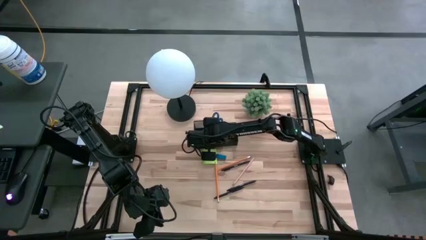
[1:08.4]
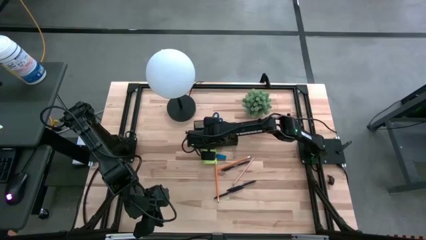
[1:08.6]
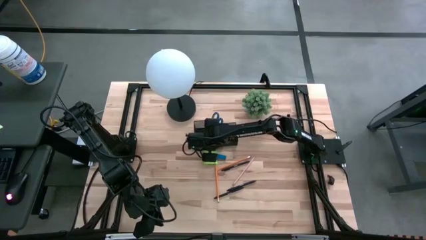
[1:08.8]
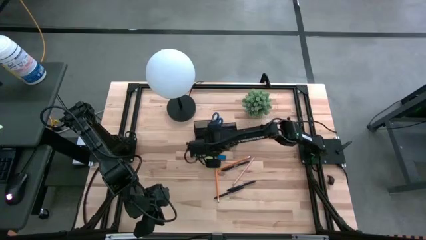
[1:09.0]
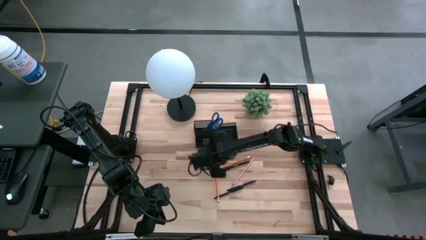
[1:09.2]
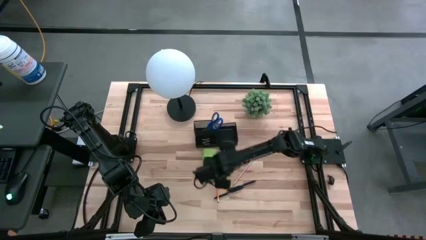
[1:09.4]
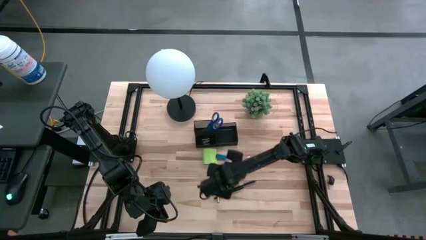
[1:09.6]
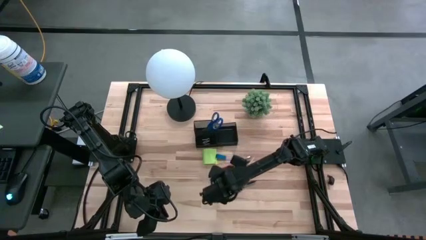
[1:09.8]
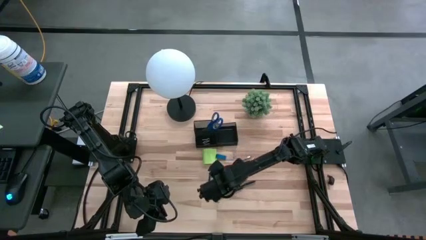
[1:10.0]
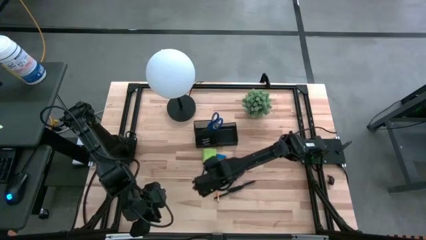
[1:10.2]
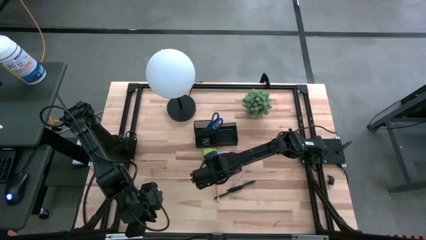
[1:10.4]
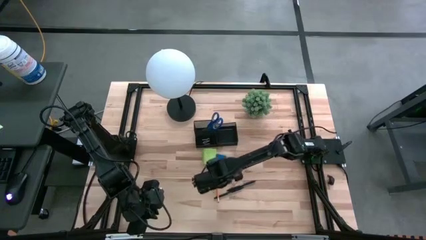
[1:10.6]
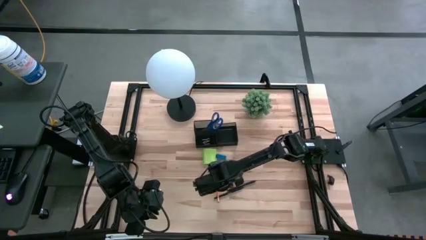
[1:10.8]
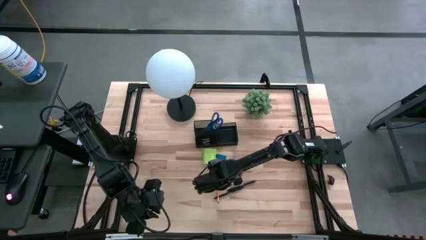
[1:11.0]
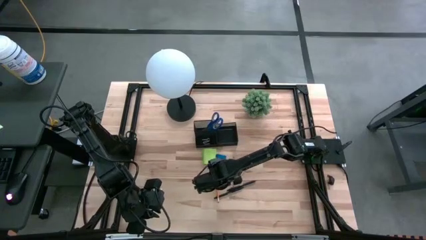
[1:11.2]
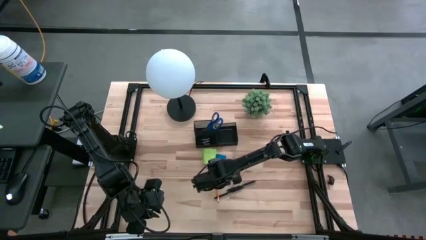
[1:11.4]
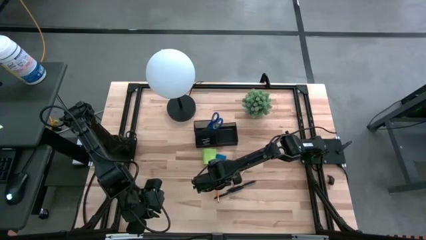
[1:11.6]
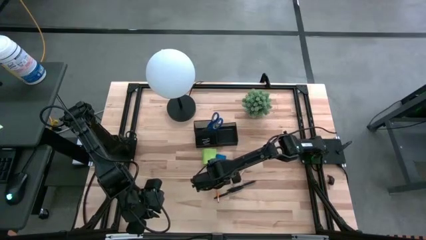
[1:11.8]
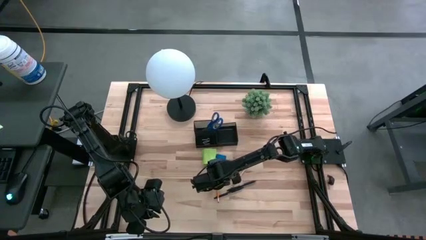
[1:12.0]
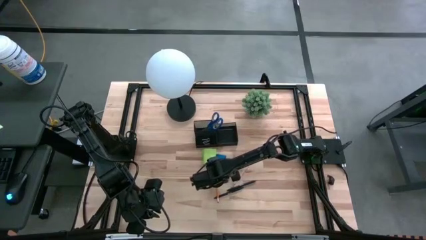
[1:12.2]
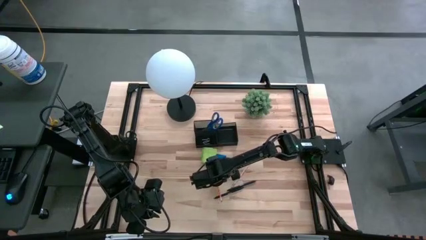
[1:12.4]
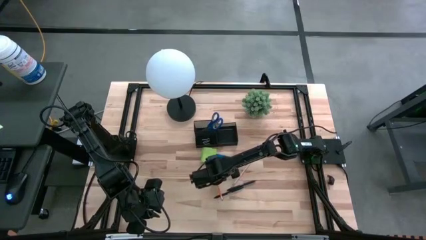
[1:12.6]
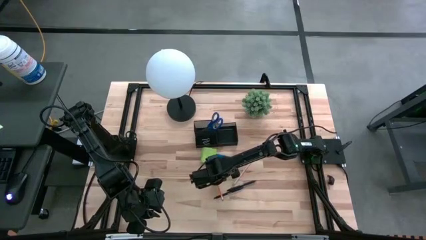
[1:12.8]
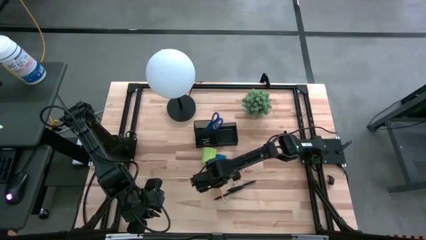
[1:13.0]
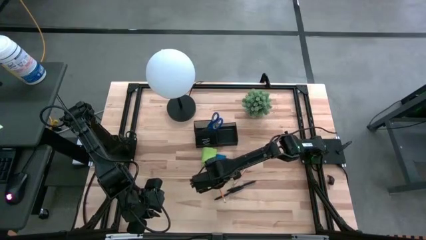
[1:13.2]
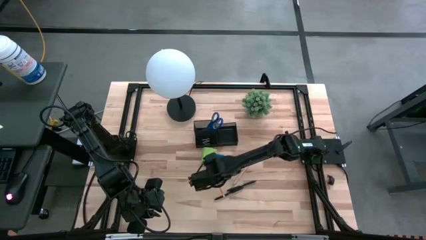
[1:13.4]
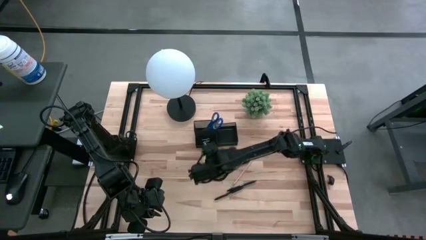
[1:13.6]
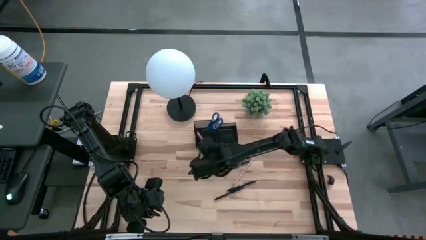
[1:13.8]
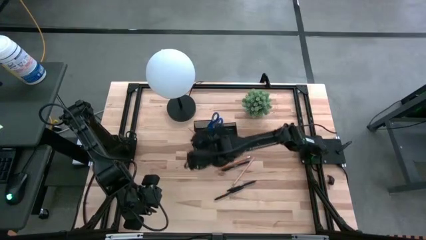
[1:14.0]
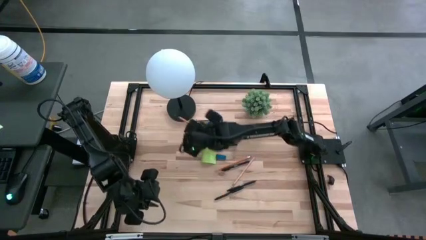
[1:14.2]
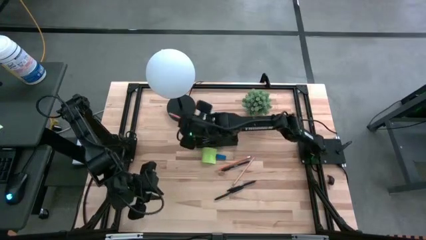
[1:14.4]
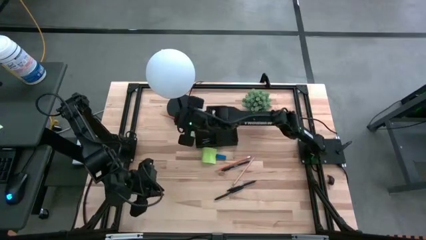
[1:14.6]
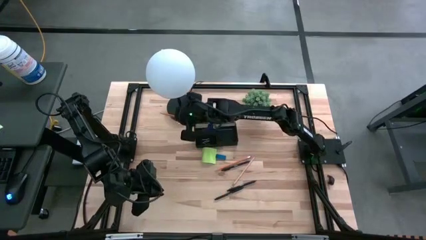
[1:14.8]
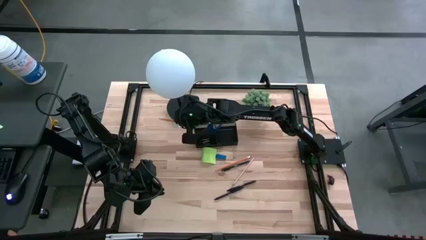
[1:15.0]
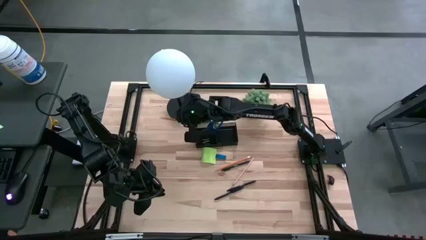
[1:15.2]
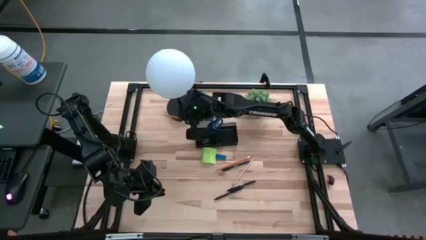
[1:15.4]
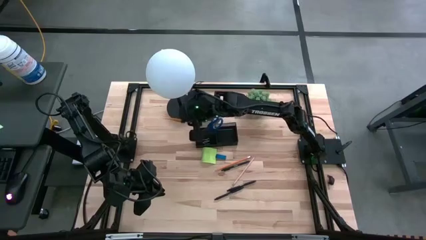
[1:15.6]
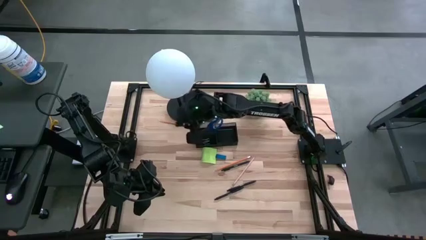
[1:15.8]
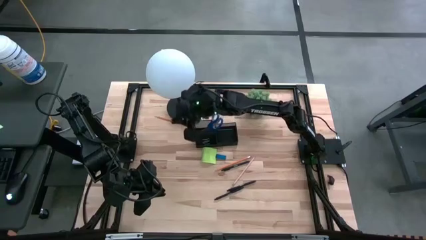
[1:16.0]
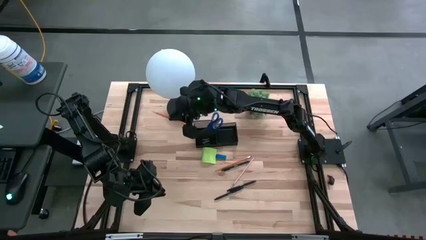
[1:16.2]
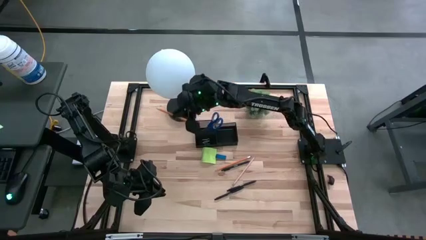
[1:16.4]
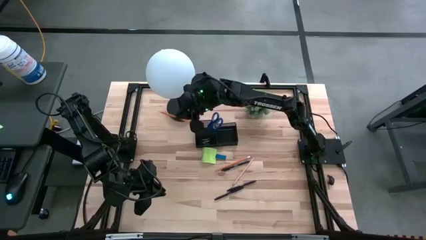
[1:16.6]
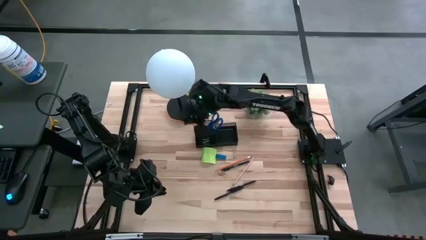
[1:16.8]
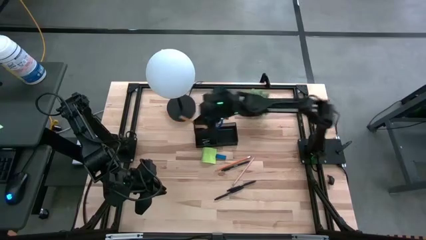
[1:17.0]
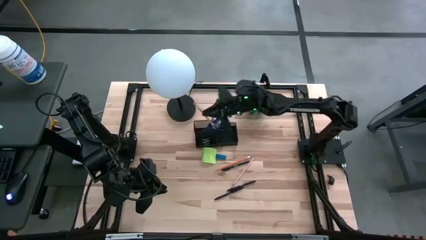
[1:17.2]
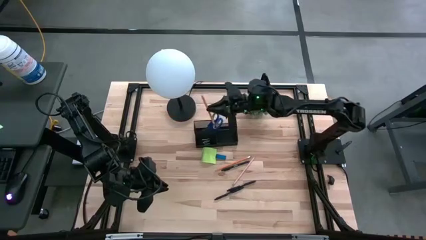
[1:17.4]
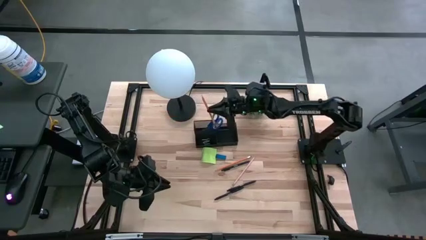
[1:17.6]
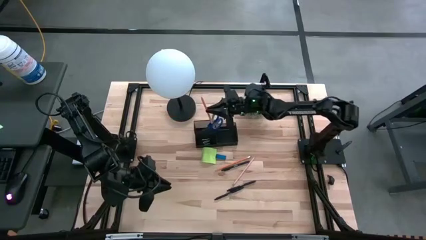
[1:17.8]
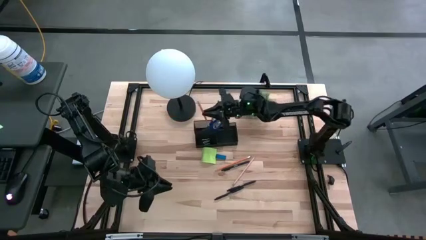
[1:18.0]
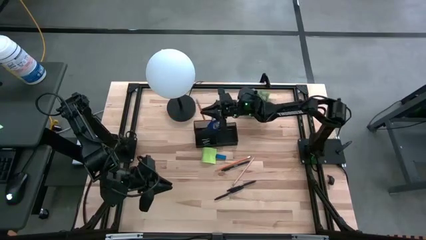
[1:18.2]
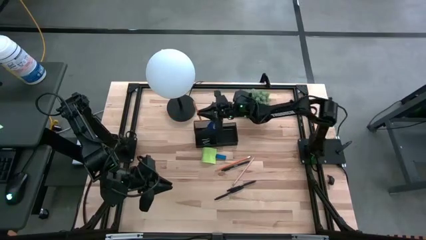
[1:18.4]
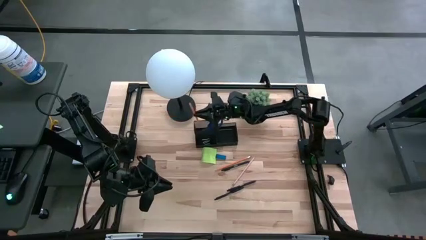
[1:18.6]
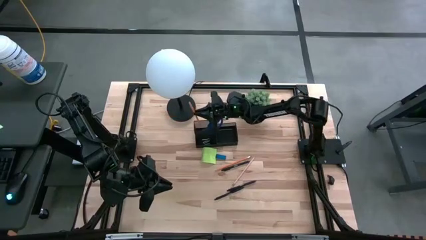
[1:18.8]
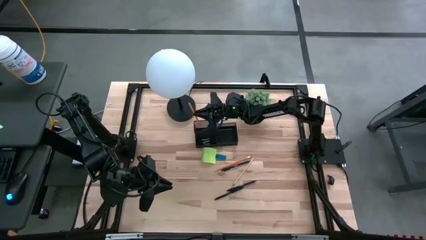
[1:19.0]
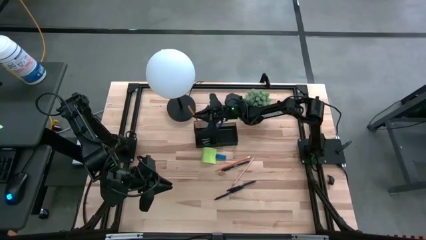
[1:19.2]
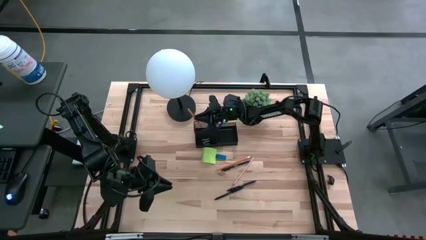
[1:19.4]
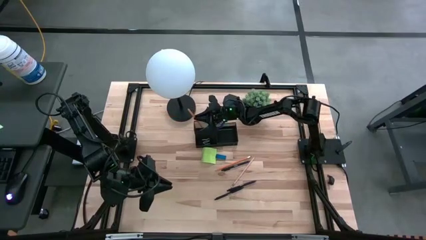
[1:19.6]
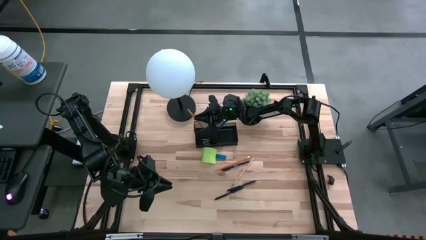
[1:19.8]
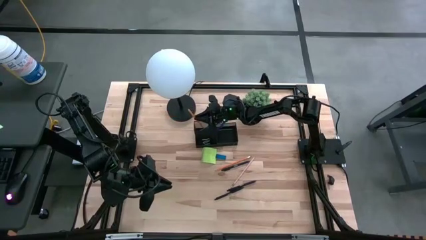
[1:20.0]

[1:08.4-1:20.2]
Task: Pick and place office supplies into organizer
Put the left orange pencil into the top left side of the desk organizer
